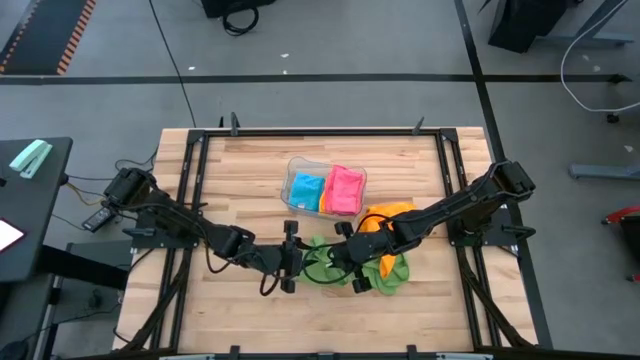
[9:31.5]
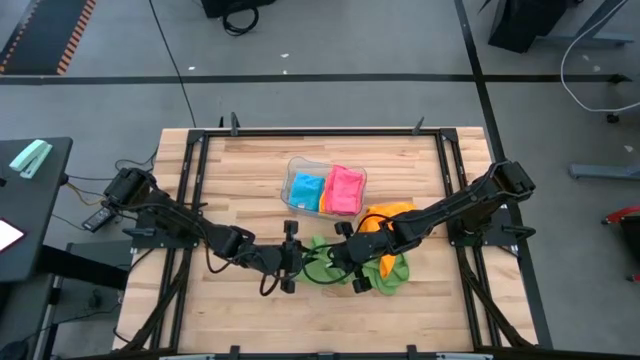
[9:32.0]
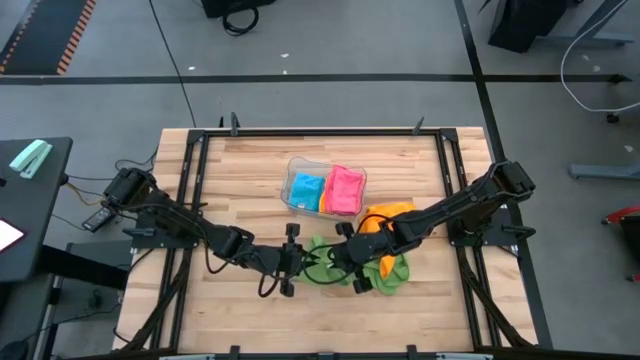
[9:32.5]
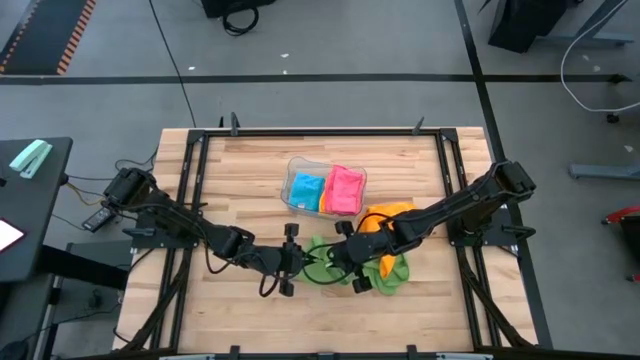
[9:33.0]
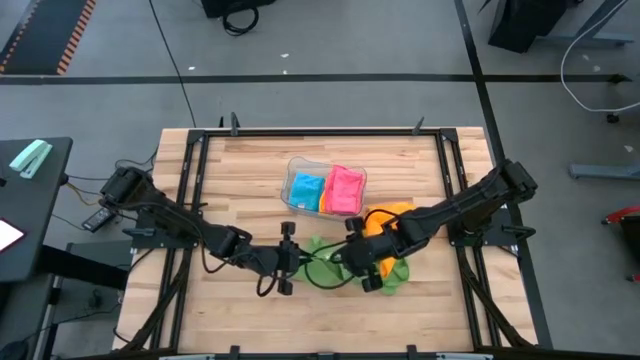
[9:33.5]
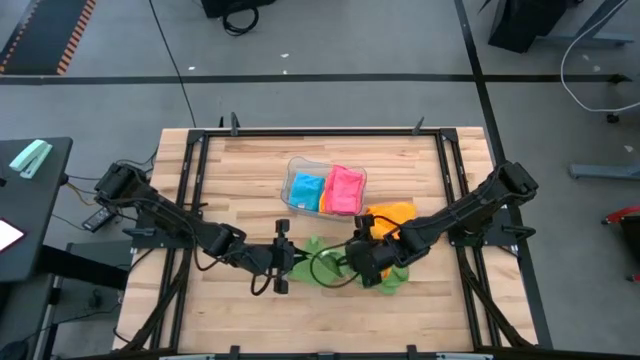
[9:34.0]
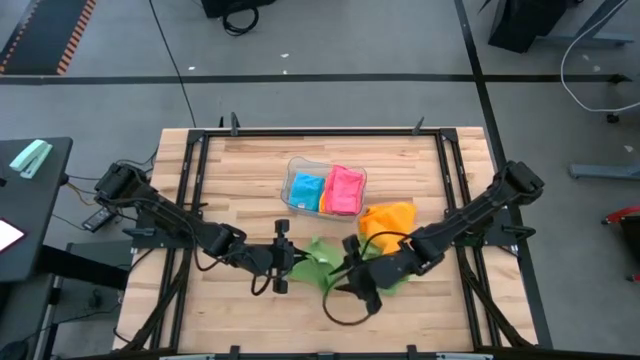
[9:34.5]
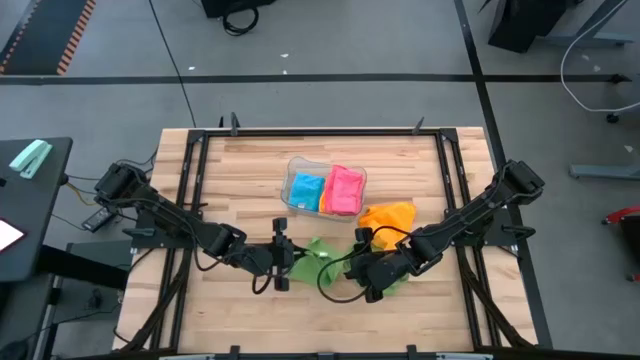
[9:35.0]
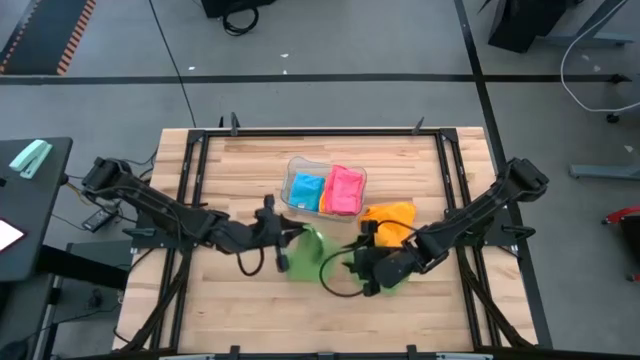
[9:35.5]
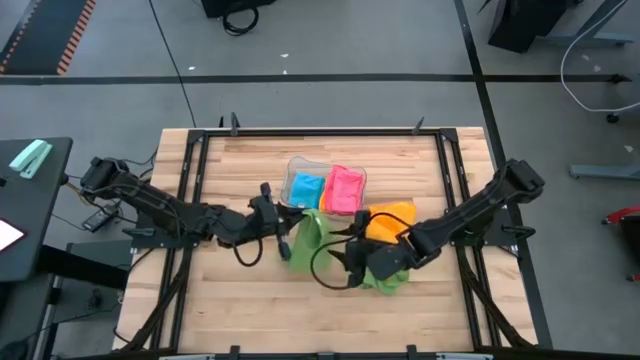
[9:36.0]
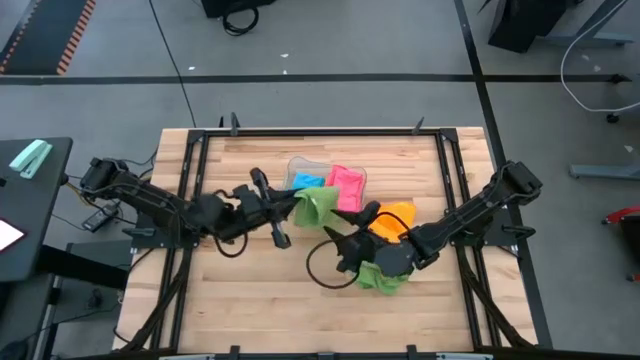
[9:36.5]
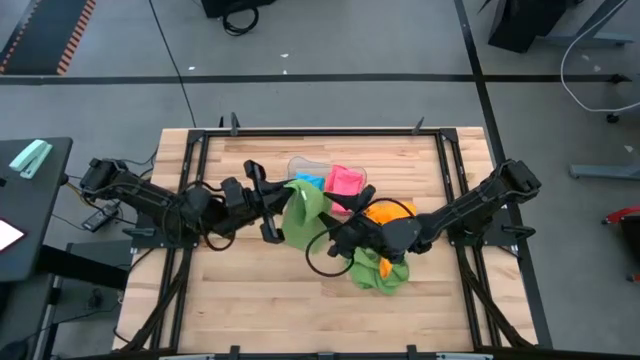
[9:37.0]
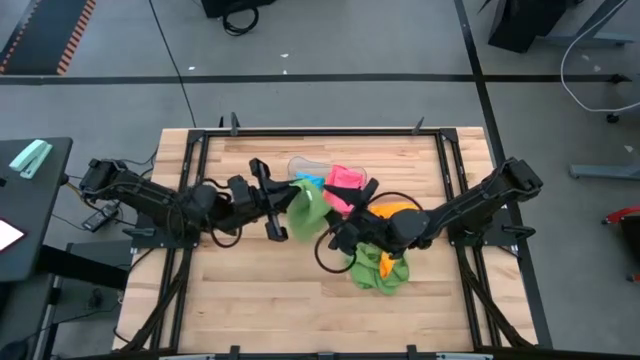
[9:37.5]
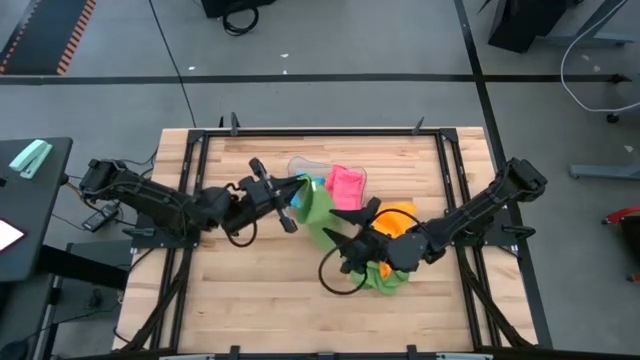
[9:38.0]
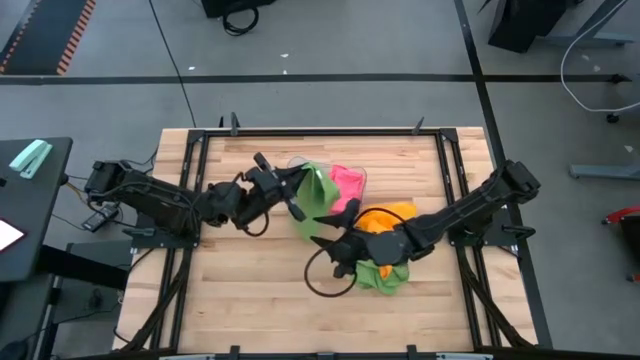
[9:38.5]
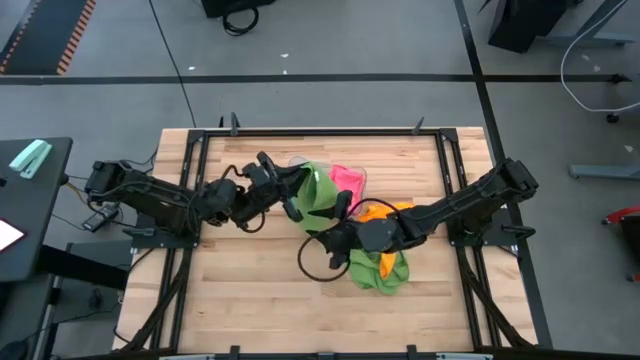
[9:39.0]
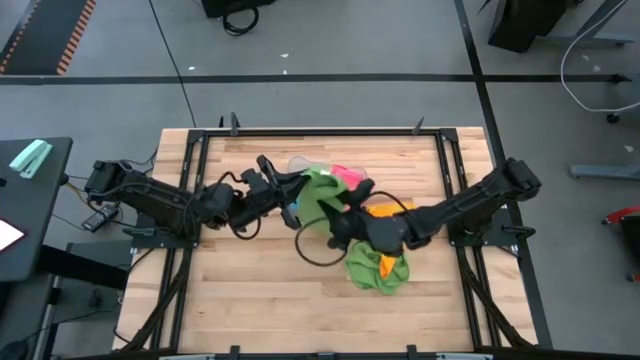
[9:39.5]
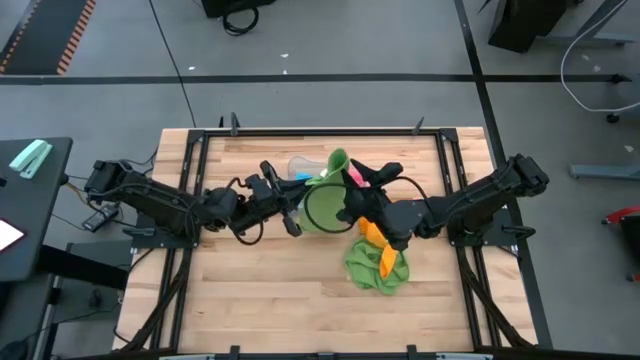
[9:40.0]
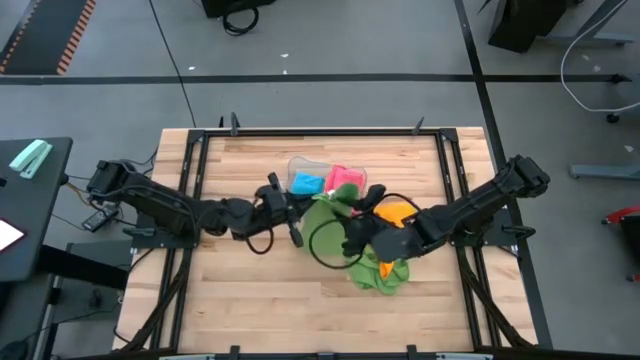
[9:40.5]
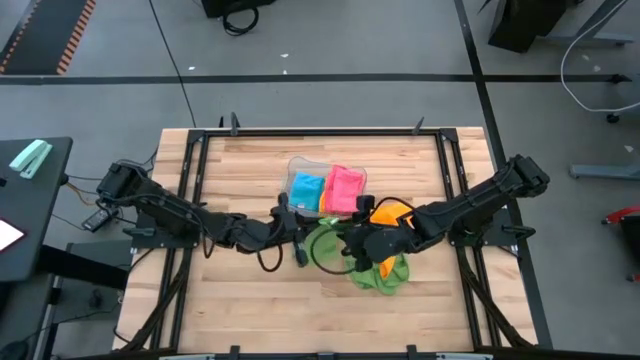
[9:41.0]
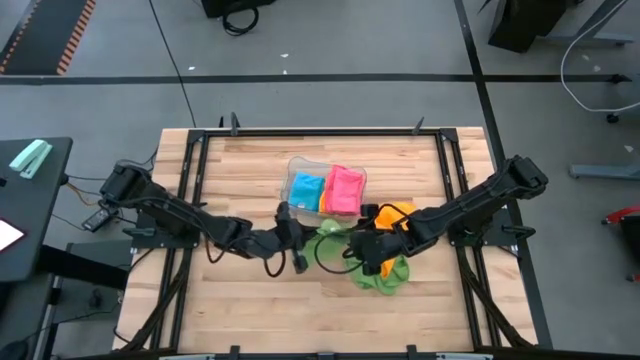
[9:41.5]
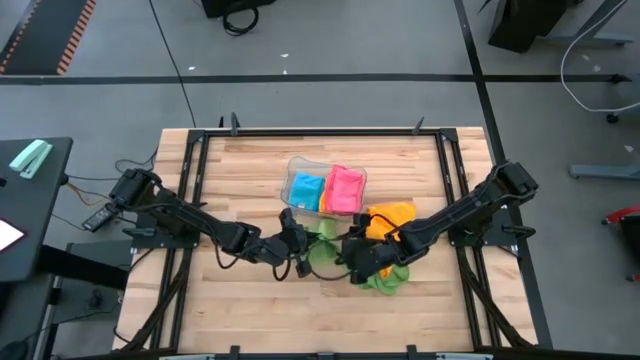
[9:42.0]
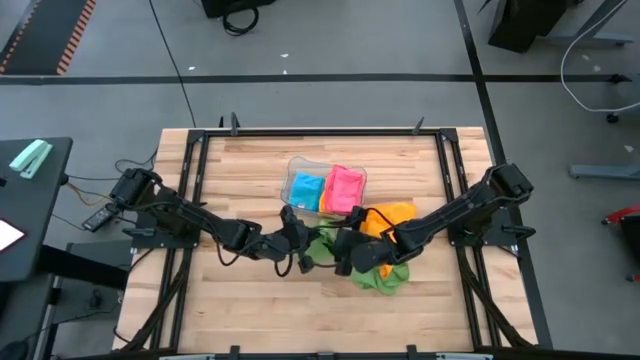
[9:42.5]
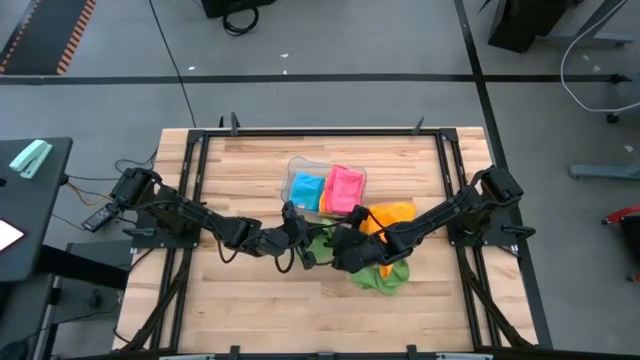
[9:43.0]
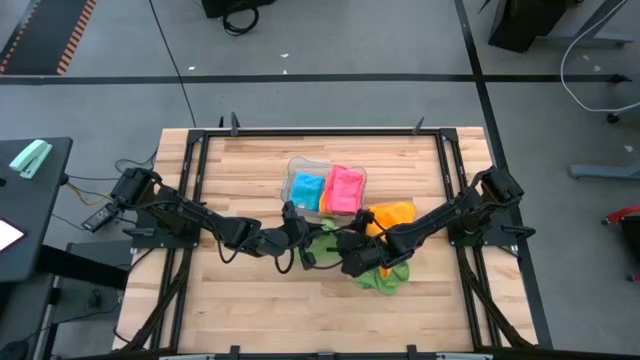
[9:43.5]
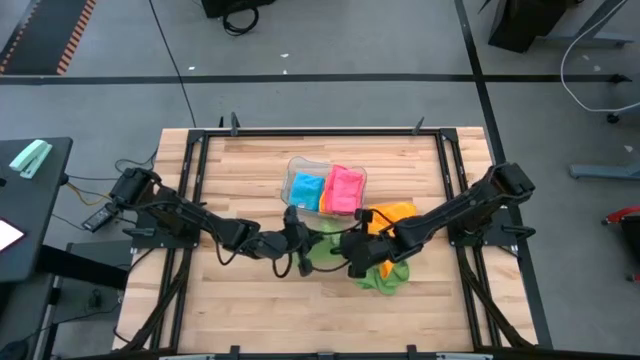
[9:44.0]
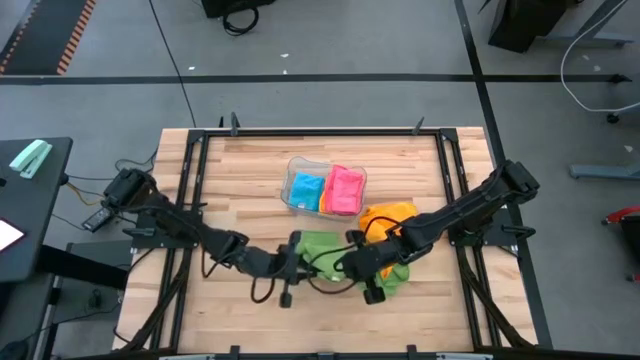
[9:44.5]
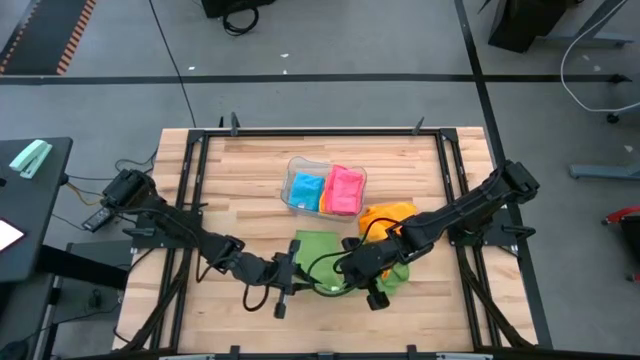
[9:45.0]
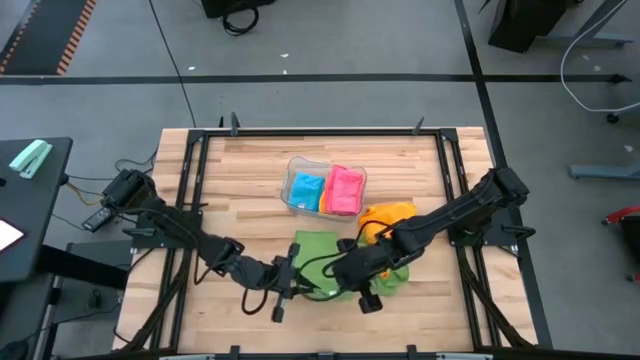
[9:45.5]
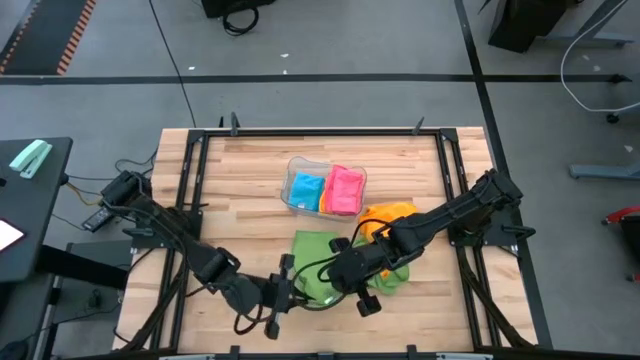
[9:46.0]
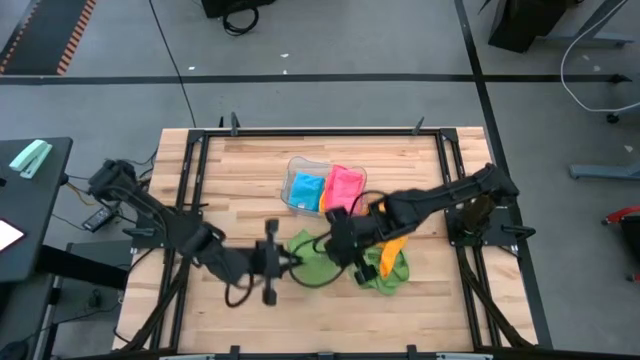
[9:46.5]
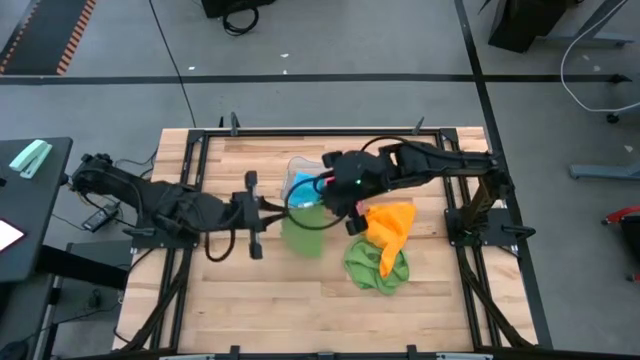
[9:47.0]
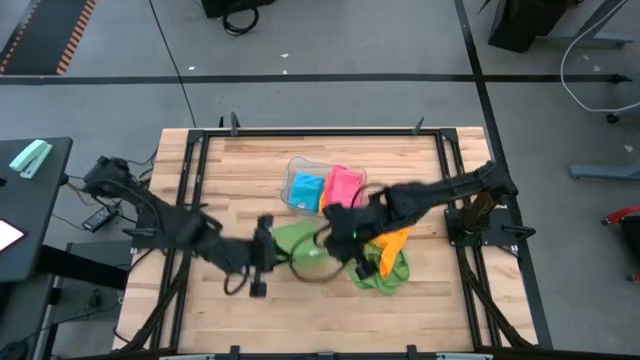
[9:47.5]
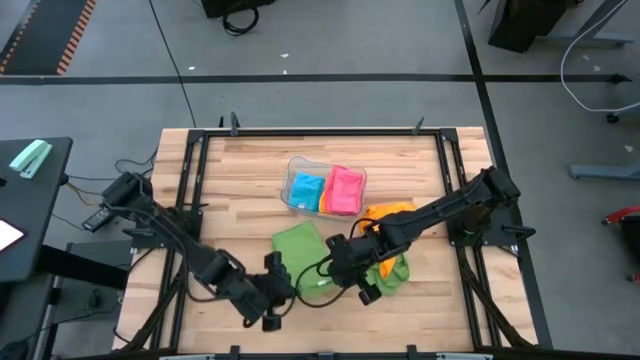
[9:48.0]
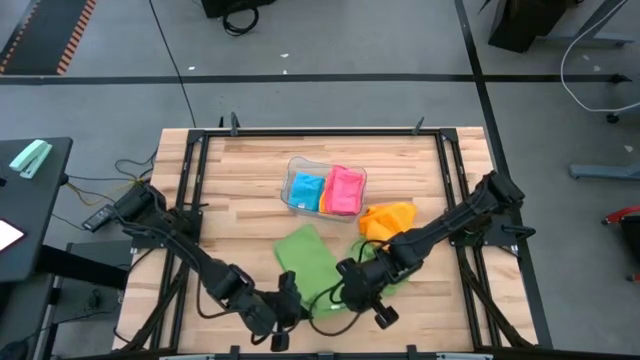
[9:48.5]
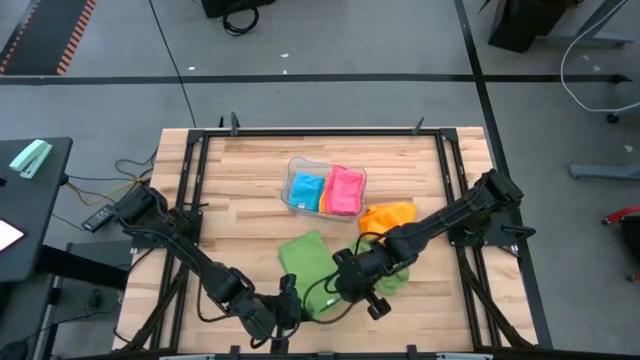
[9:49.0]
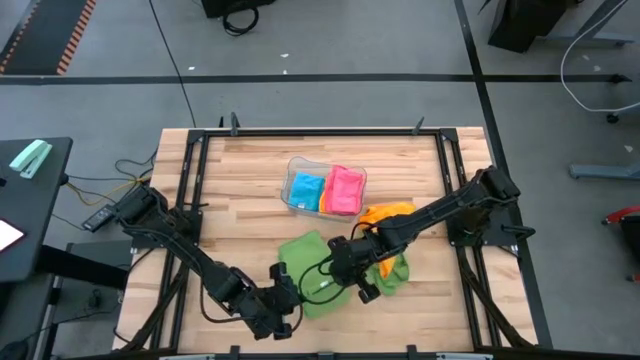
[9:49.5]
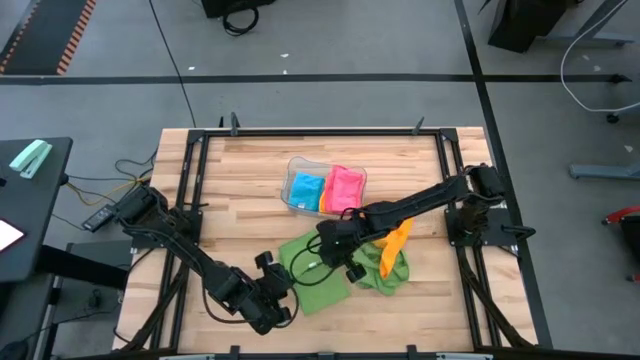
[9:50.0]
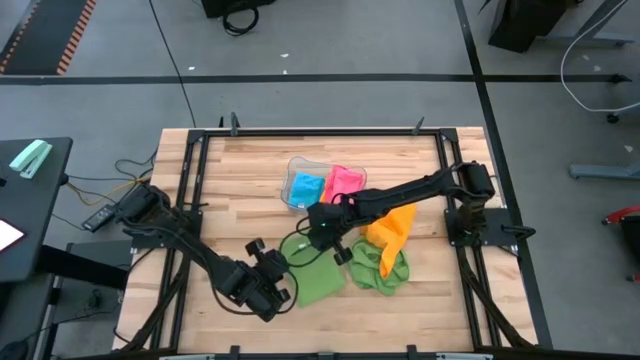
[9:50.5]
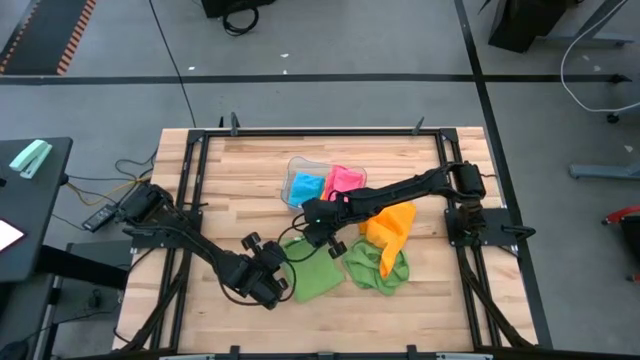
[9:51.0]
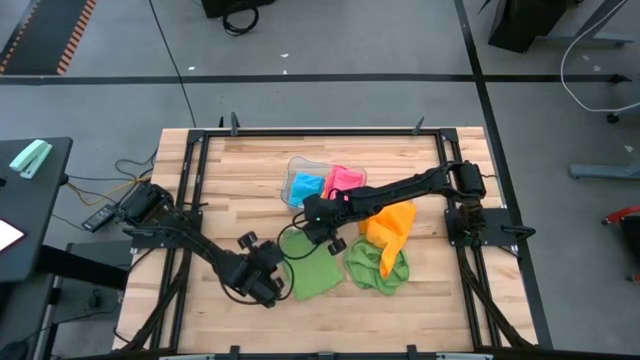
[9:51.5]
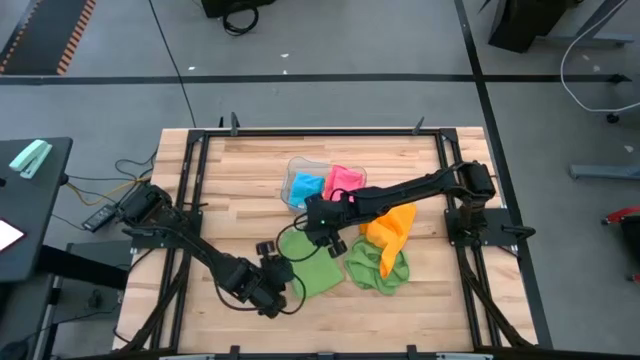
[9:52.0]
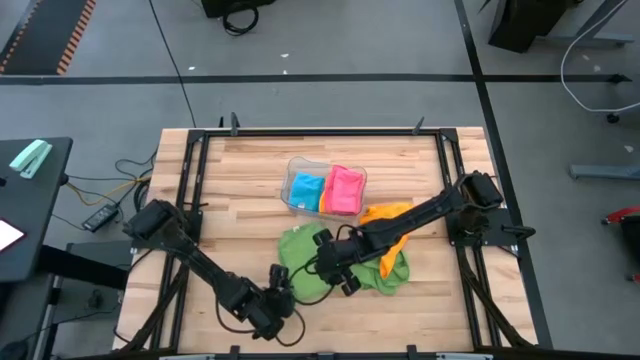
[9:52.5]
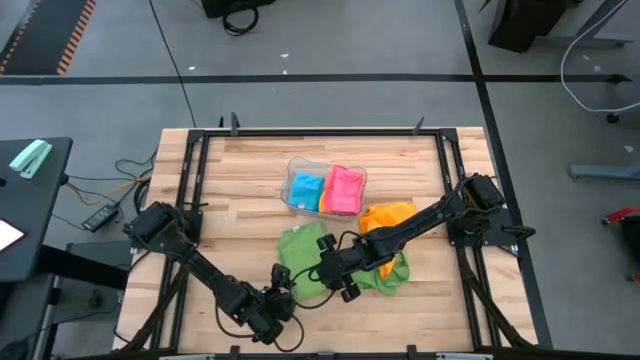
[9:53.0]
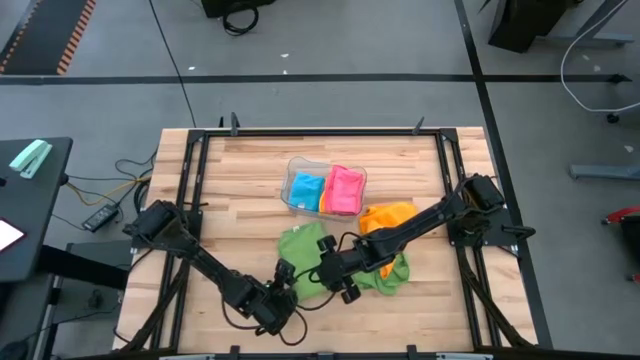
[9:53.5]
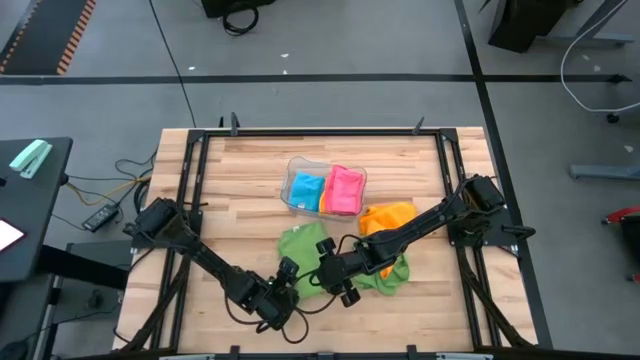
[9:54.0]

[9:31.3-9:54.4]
Task: Fold microfiber towels
Fold the top green microfiber cloth
